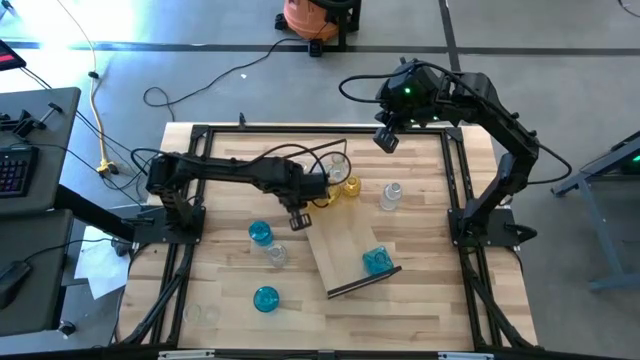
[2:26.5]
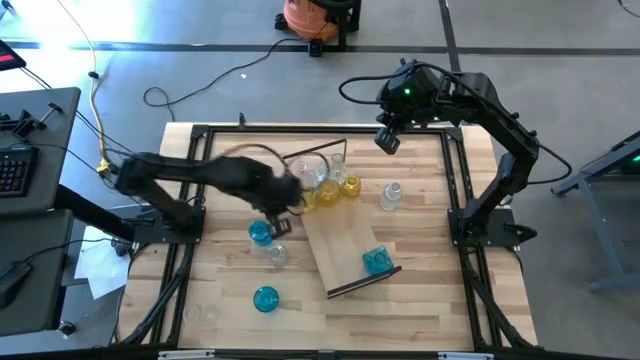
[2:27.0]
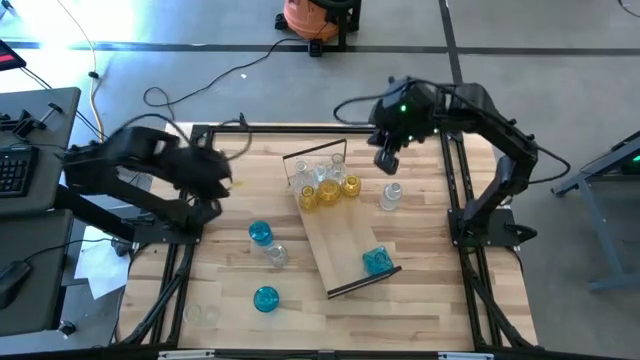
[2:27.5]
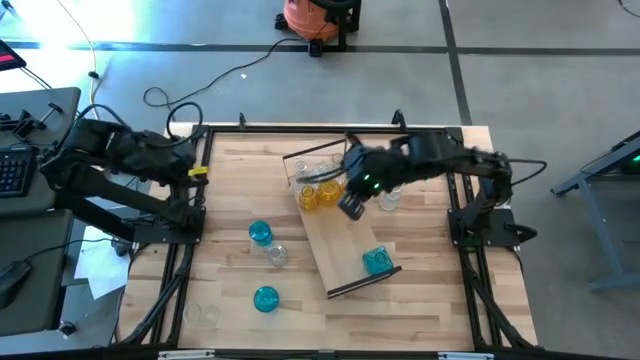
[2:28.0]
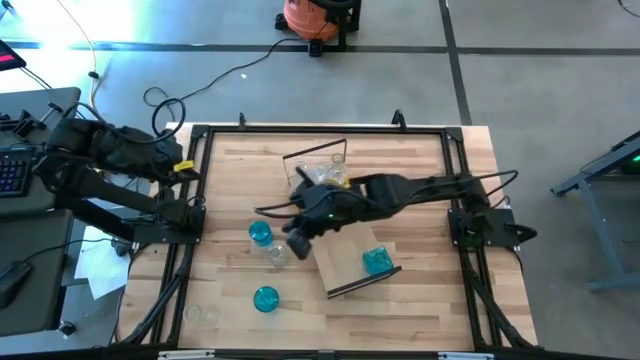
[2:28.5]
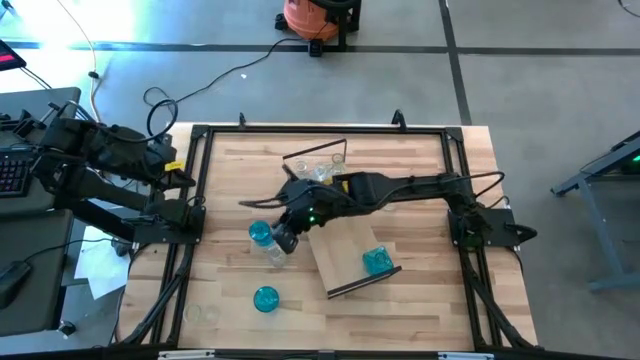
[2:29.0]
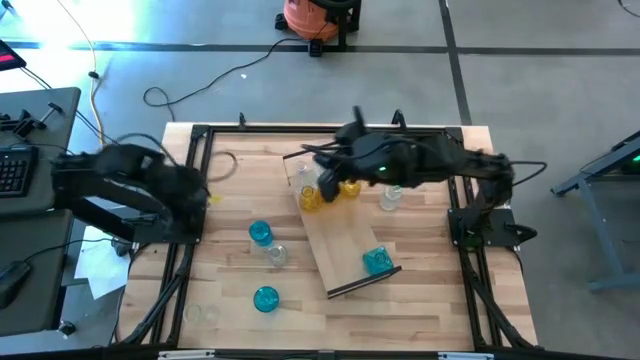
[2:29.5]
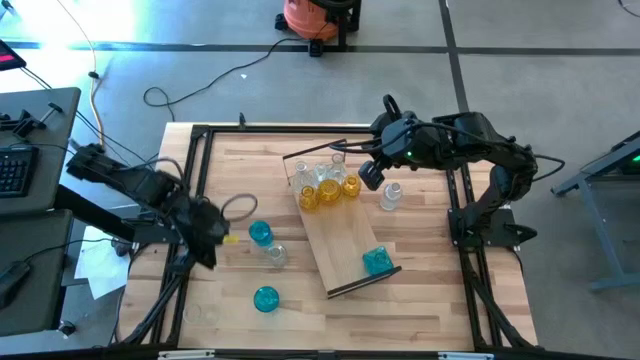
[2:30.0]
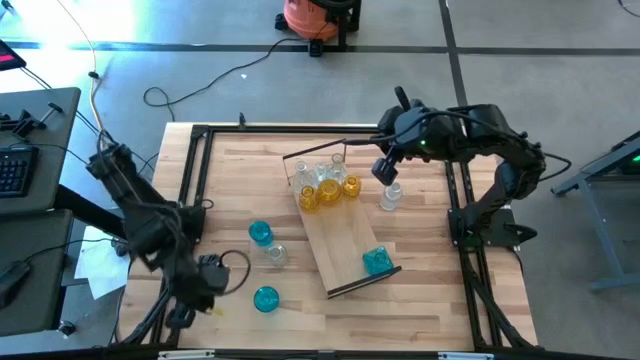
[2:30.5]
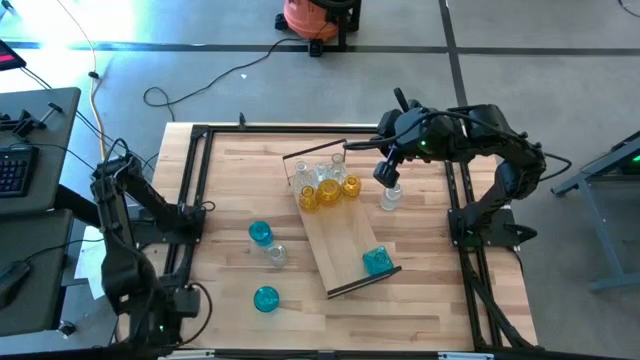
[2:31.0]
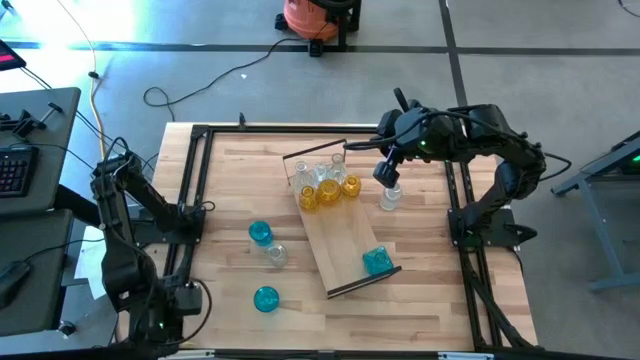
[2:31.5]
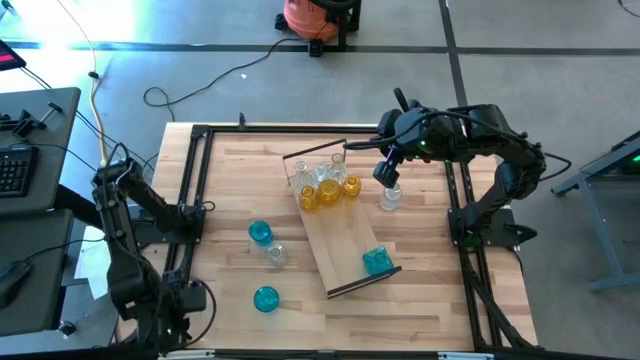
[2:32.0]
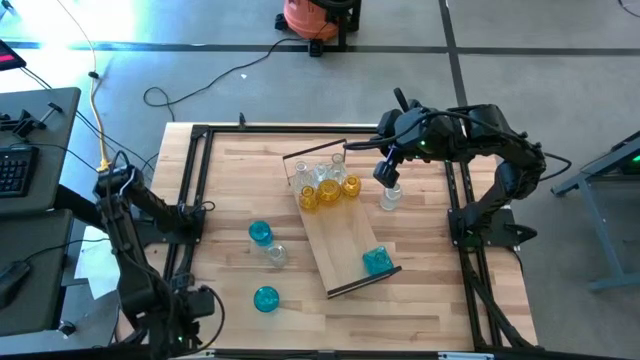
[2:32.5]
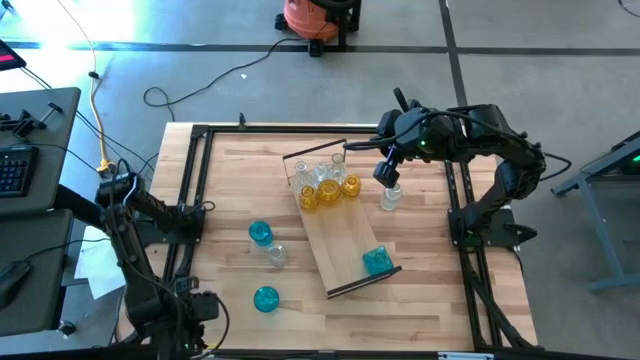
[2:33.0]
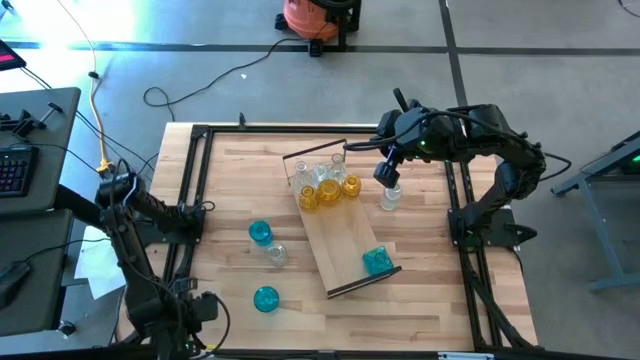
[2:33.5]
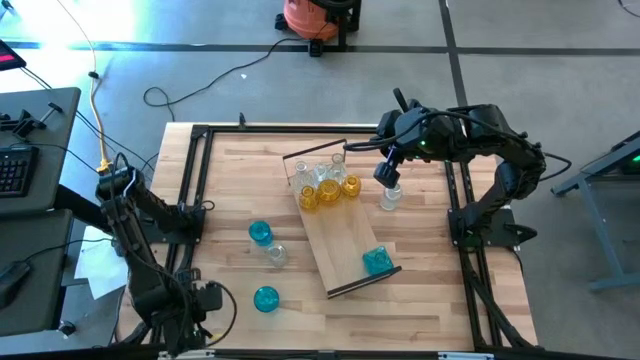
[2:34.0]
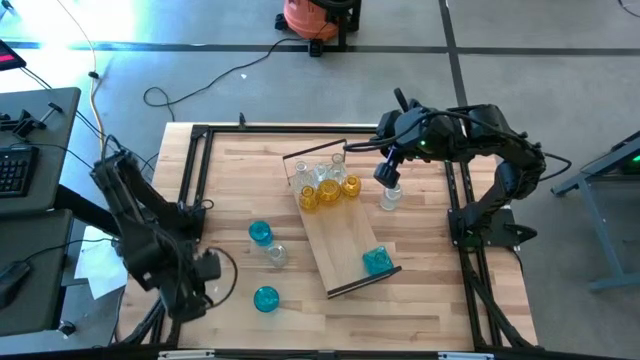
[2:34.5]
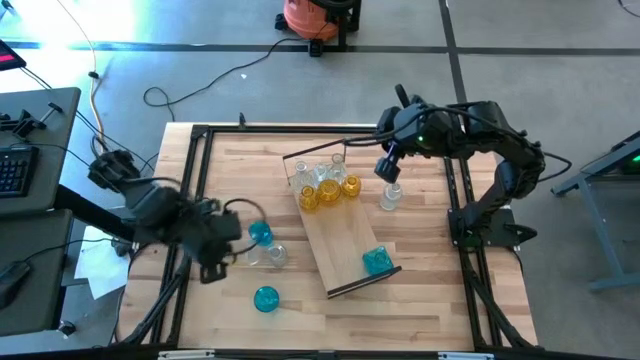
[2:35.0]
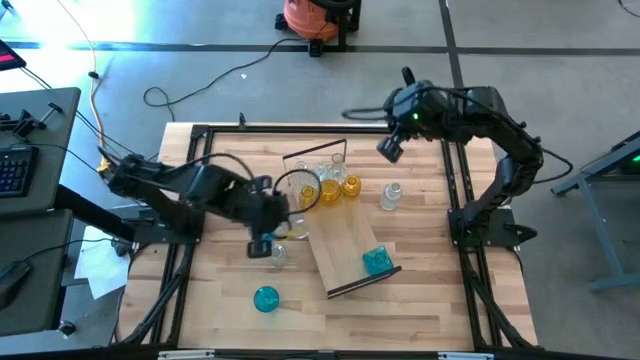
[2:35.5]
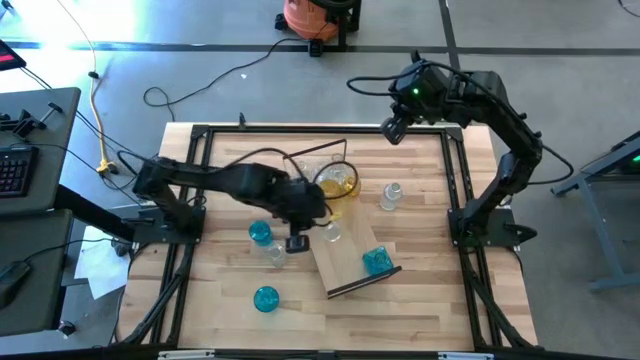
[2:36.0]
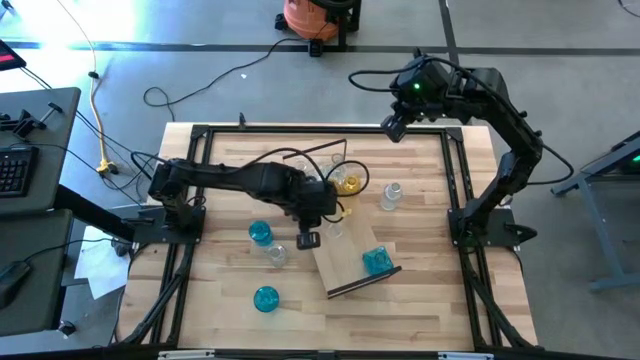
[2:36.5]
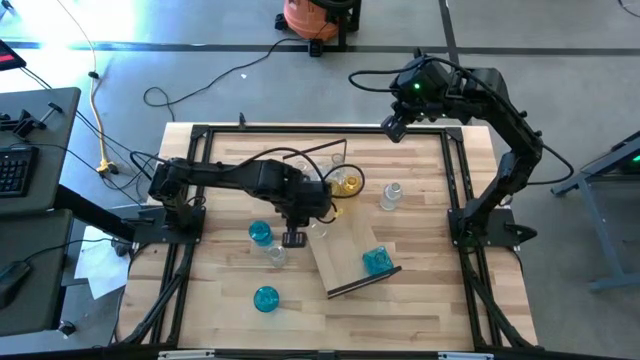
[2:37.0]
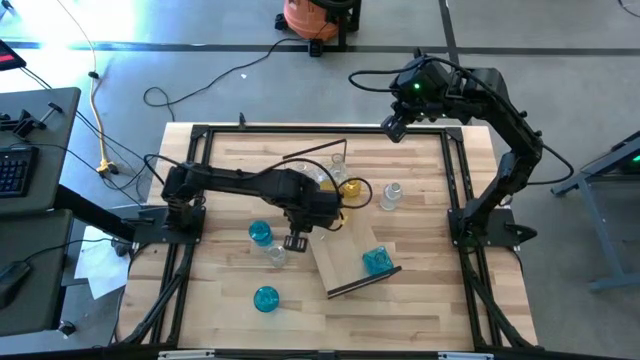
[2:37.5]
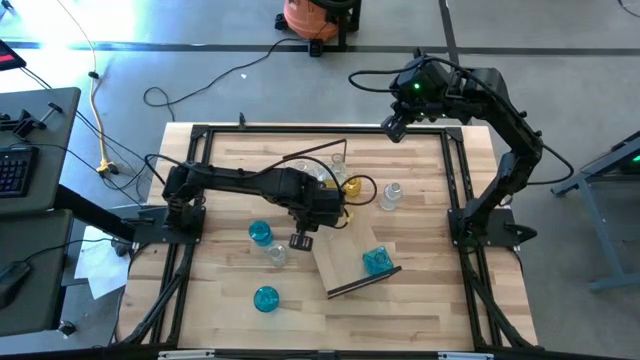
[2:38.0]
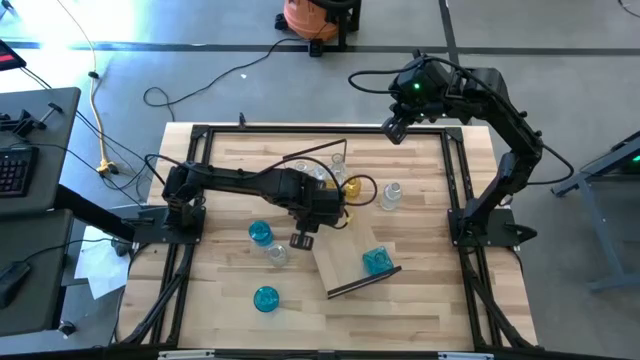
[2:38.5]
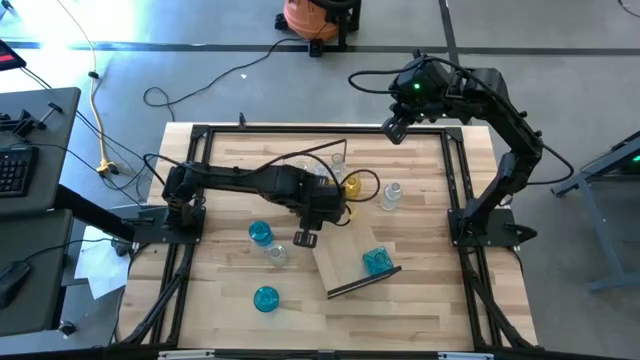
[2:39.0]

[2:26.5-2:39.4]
Task: sort vases onto shelf
Put the transparent crystal vase on the shelf

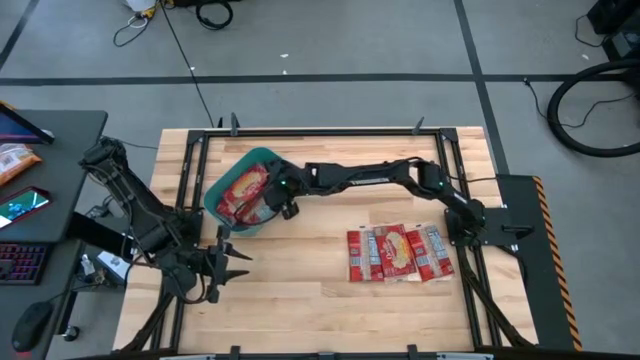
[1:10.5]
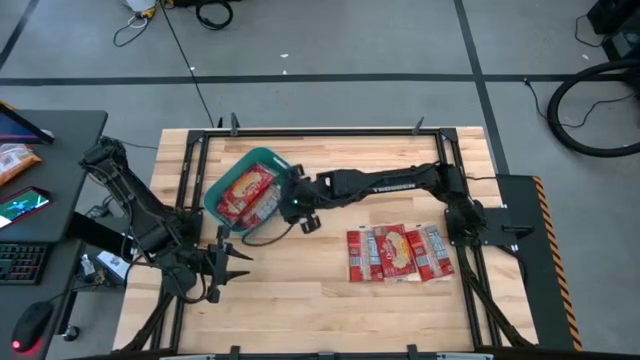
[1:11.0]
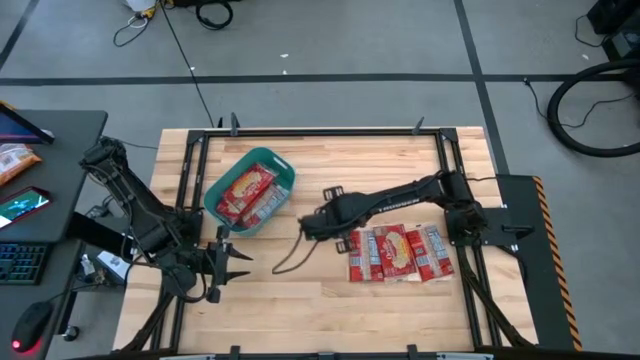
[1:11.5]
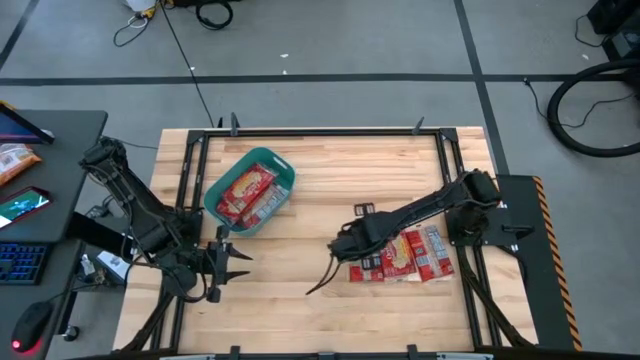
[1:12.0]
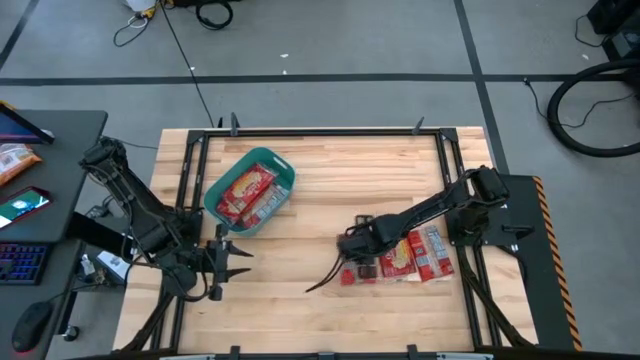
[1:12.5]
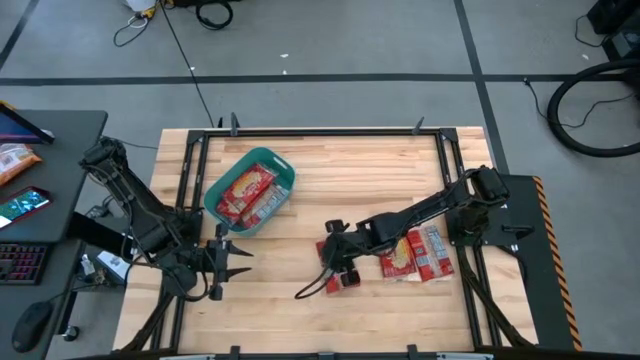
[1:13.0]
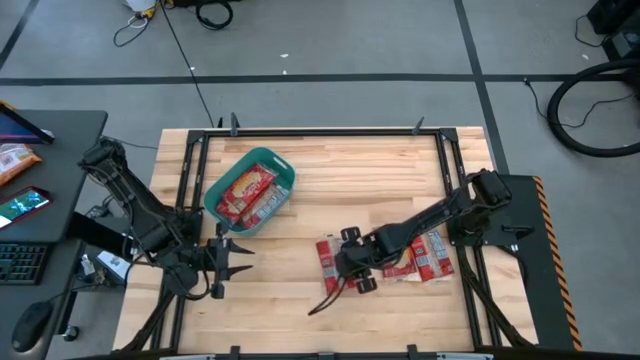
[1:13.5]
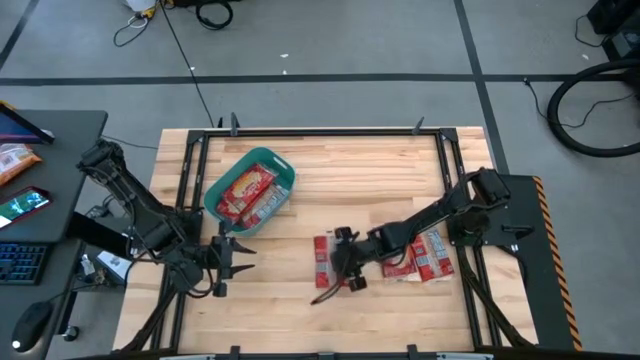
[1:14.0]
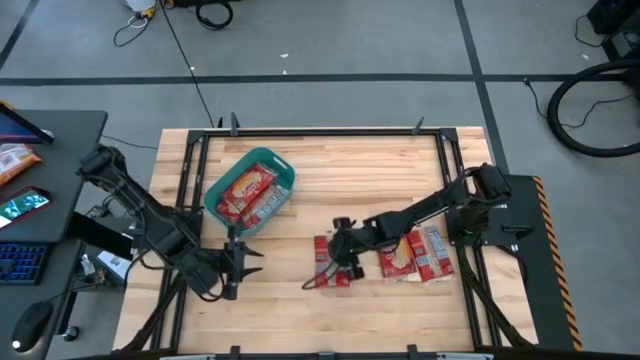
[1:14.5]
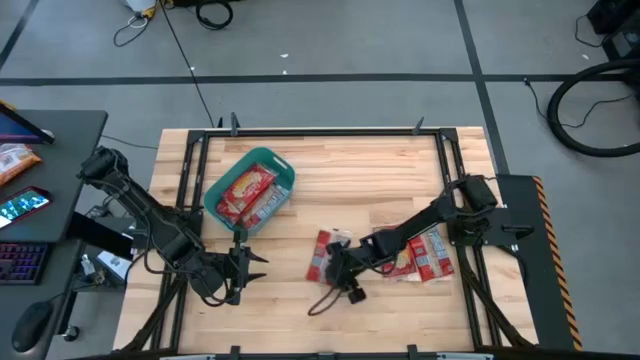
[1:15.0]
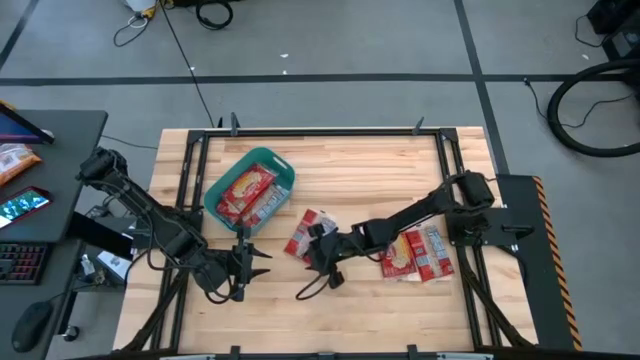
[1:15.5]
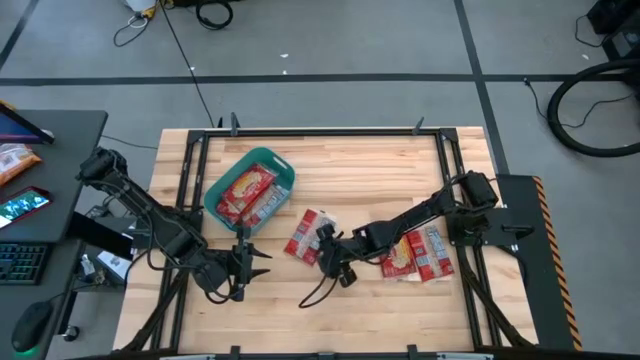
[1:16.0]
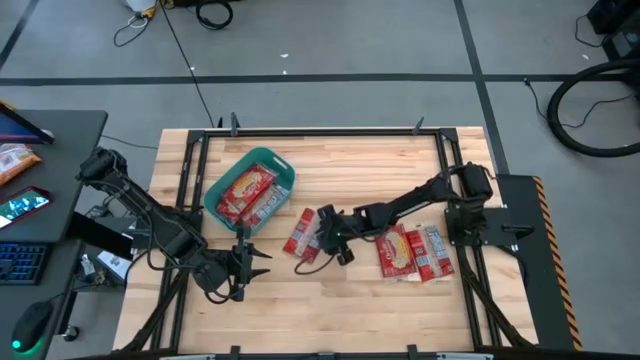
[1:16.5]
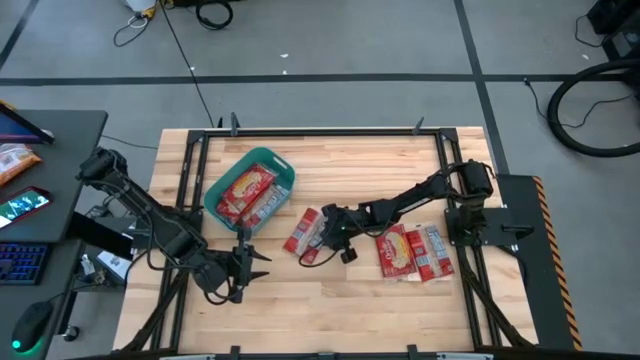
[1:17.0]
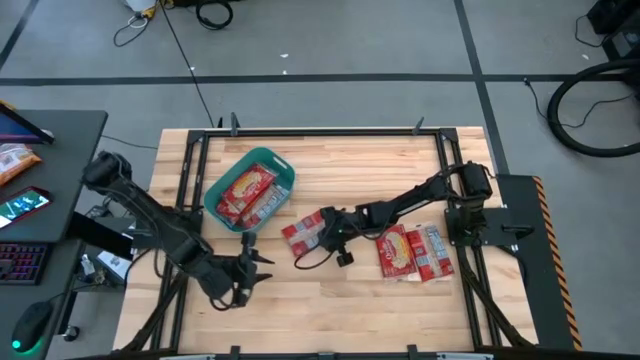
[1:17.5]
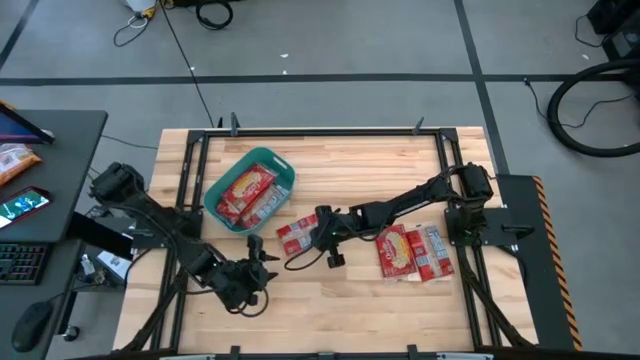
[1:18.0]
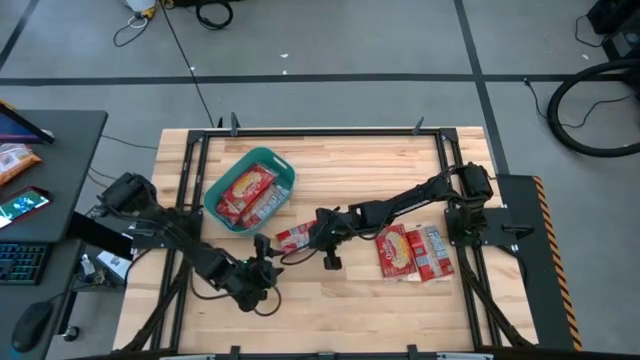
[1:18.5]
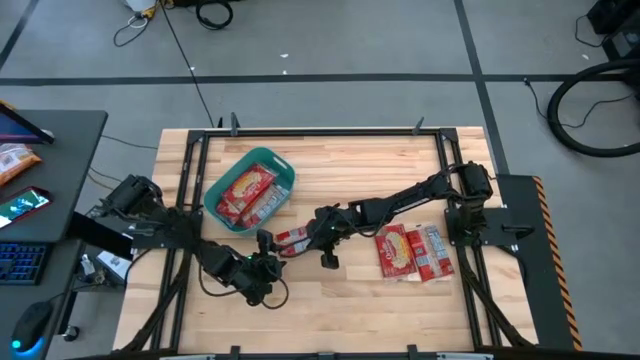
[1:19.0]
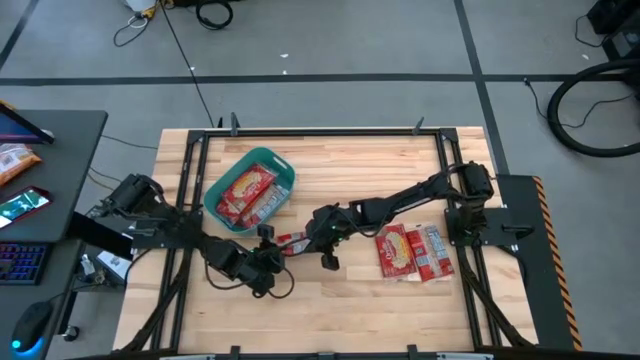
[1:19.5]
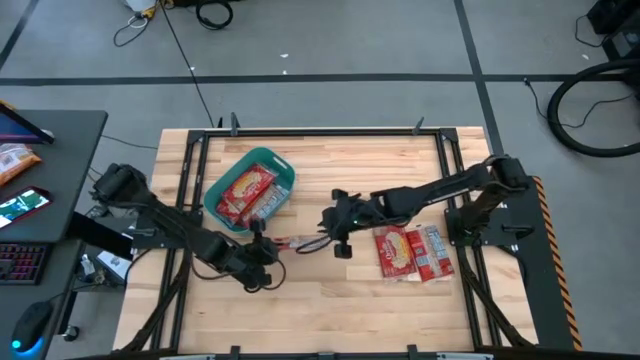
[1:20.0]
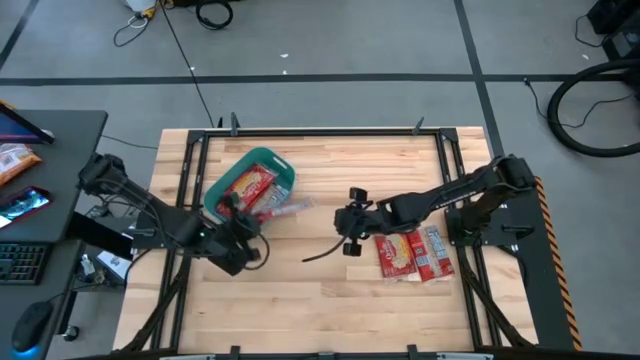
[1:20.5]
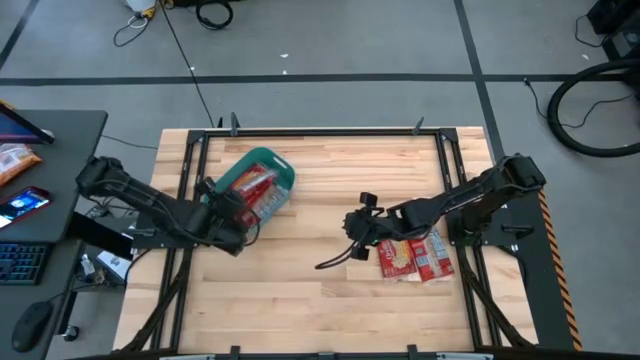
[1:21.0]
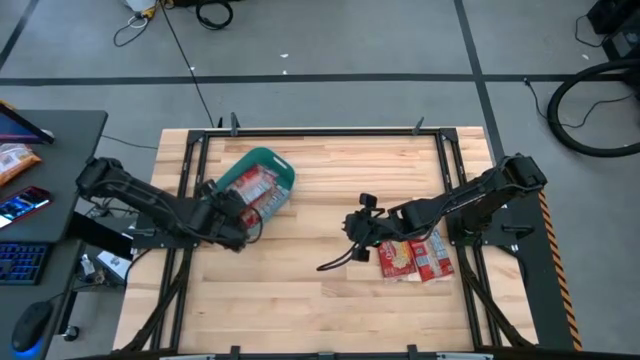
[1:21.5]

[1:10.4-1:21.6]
Task: Sort popcorn bags into baskets
Put the left red popcorn bag into the green bin
